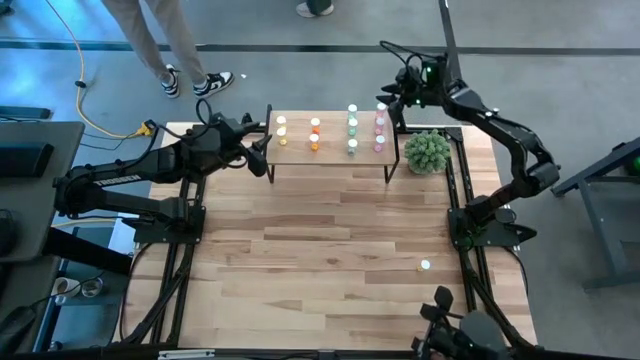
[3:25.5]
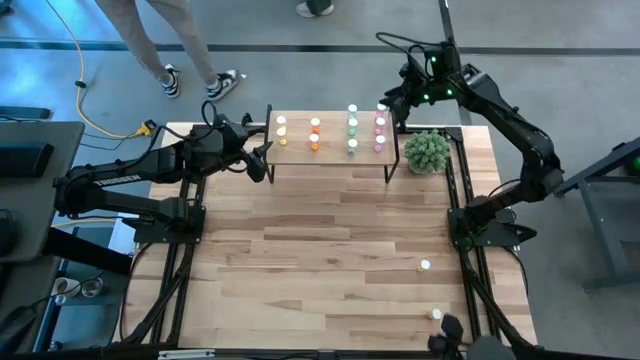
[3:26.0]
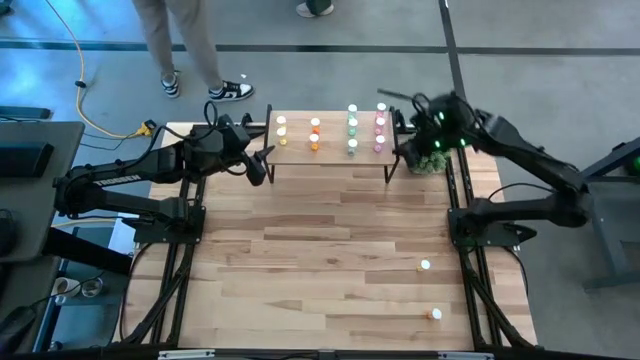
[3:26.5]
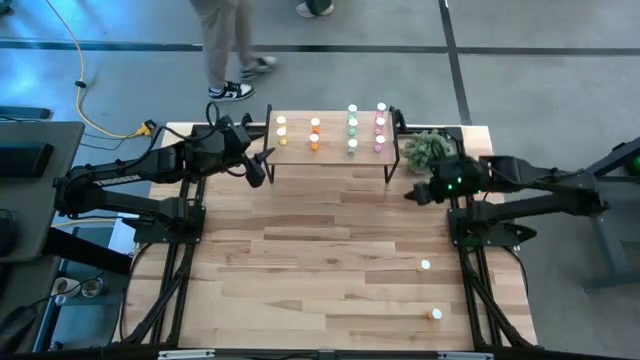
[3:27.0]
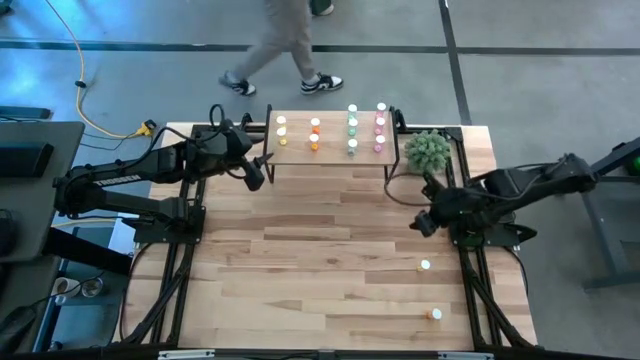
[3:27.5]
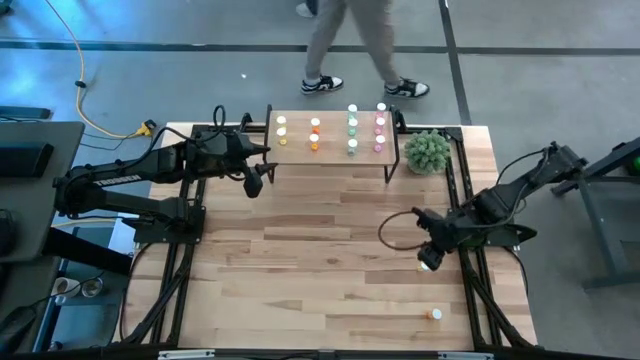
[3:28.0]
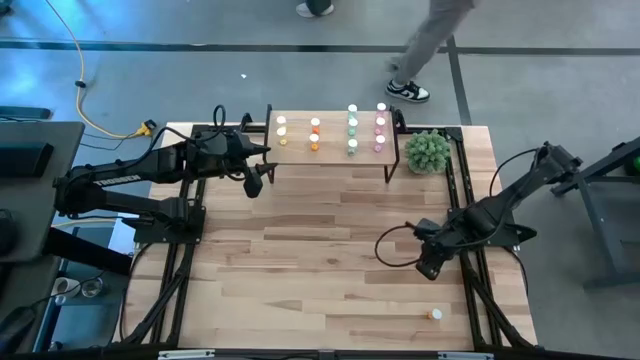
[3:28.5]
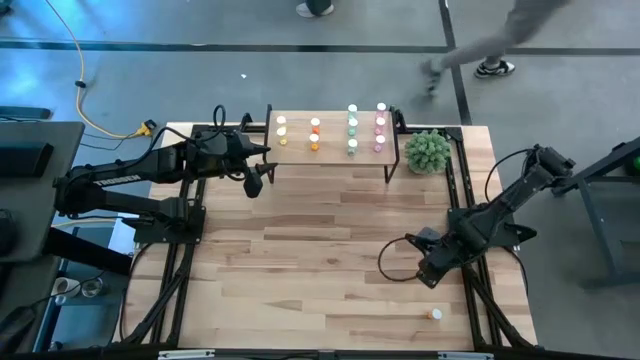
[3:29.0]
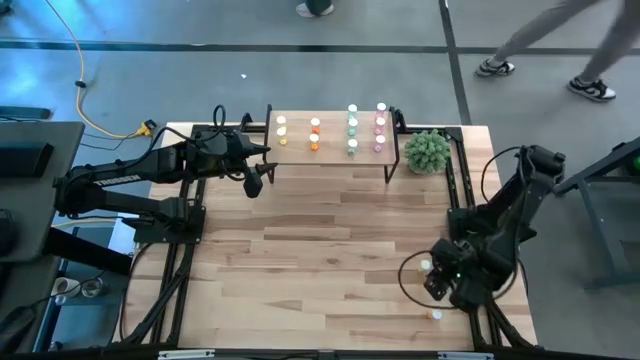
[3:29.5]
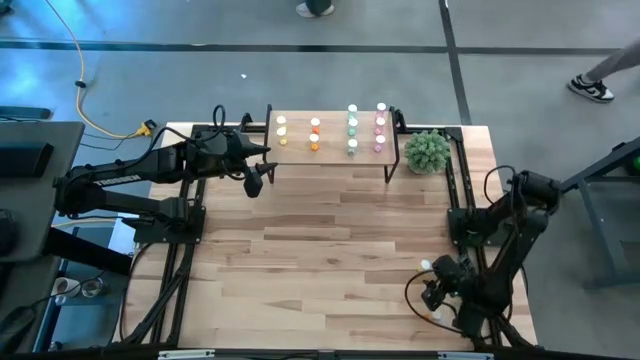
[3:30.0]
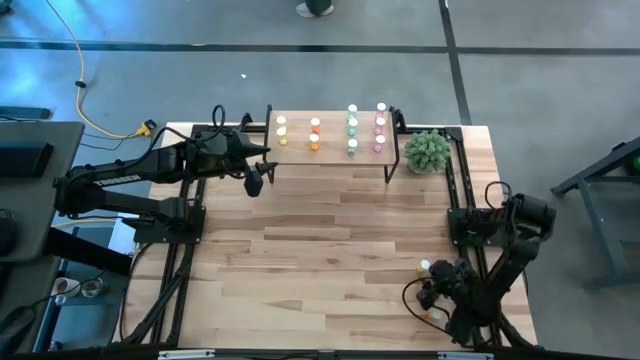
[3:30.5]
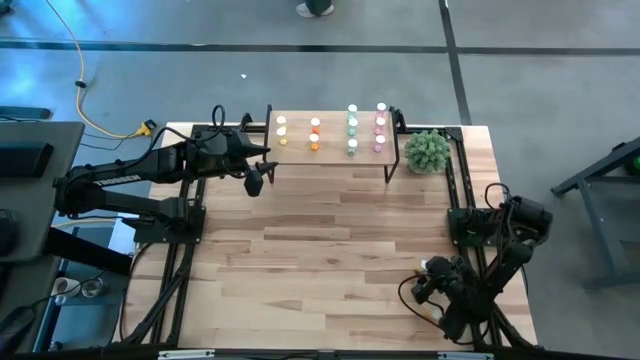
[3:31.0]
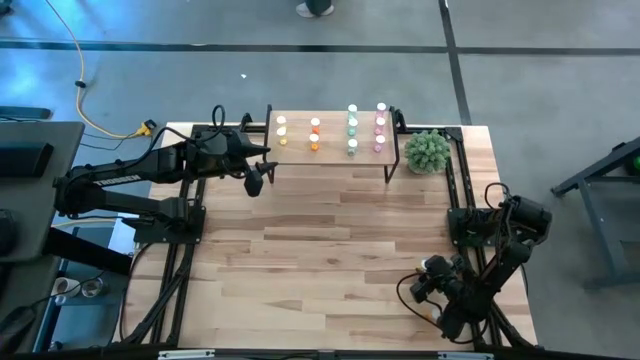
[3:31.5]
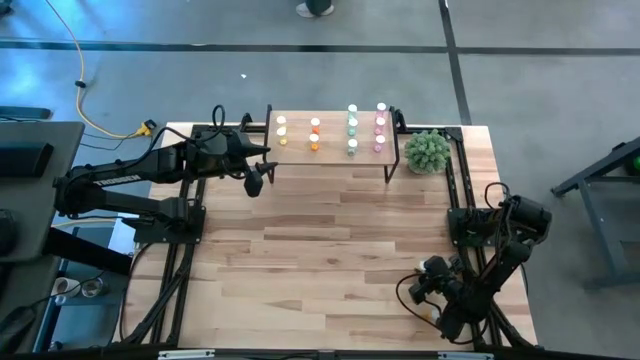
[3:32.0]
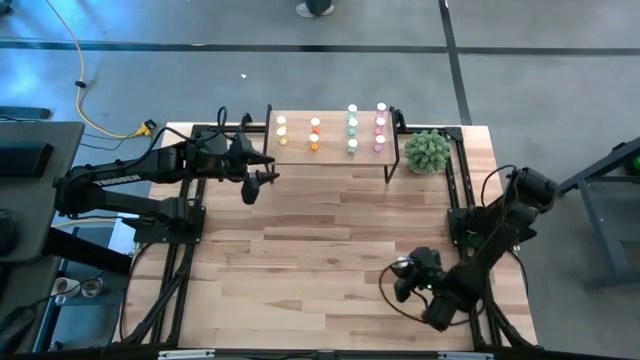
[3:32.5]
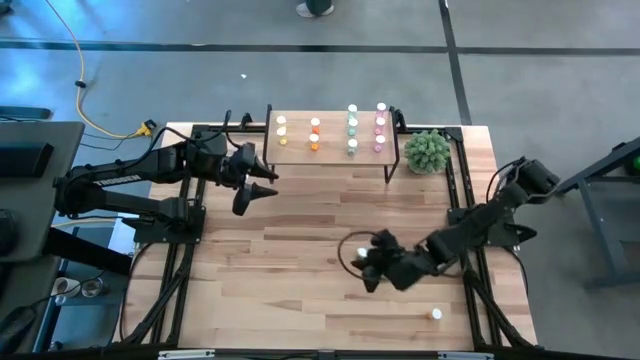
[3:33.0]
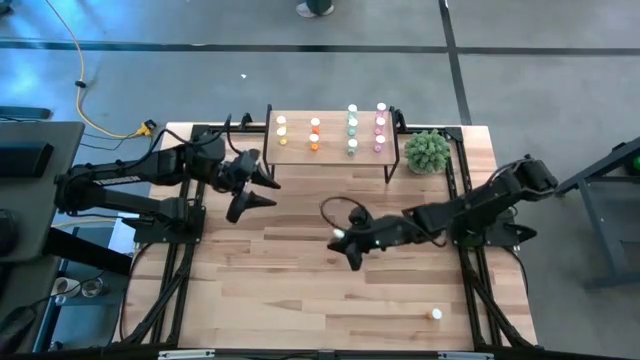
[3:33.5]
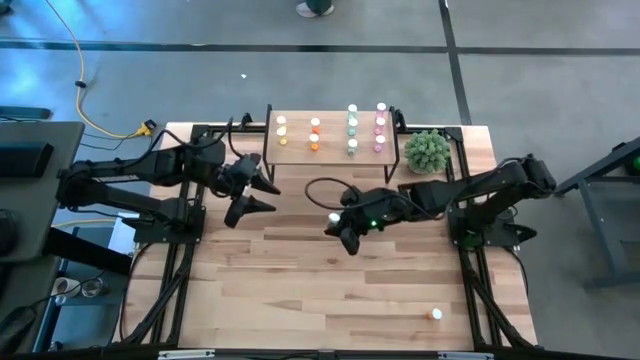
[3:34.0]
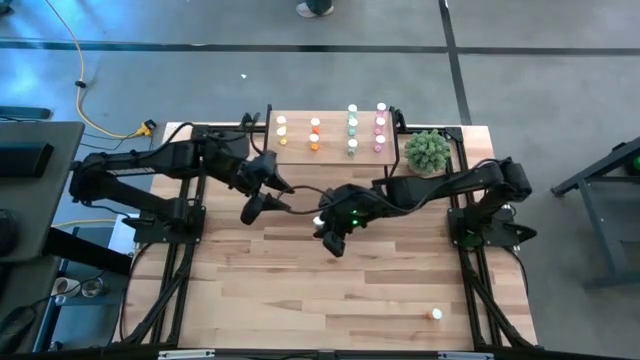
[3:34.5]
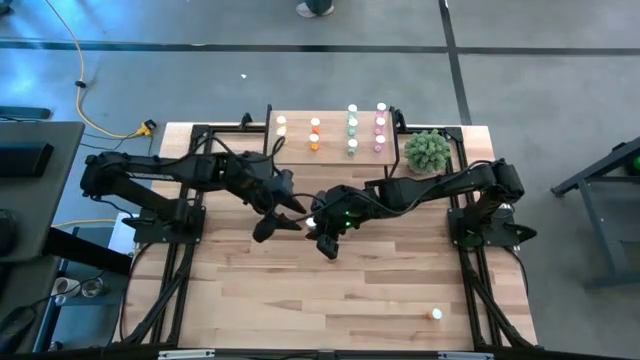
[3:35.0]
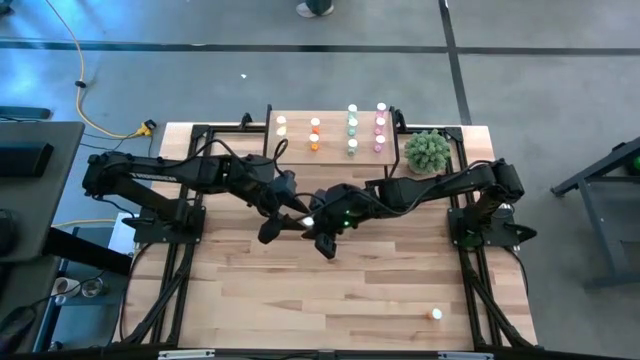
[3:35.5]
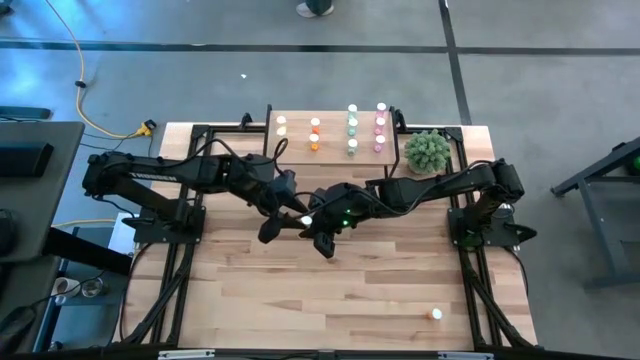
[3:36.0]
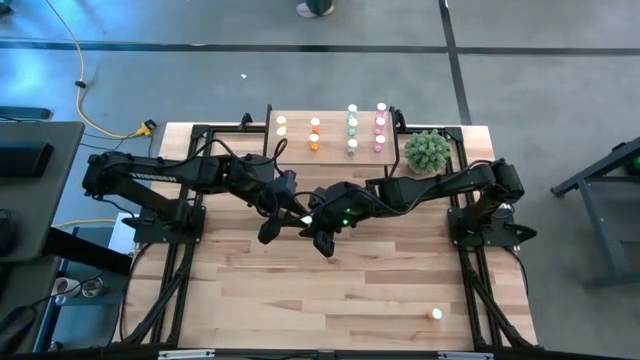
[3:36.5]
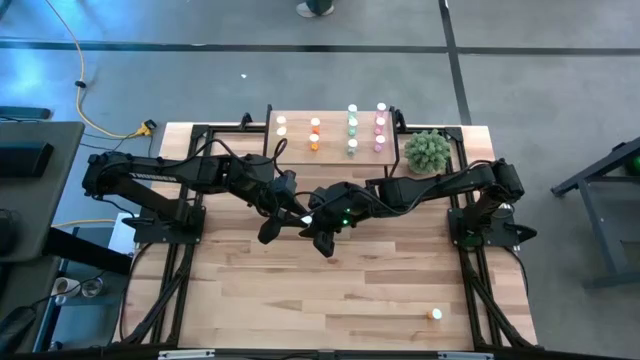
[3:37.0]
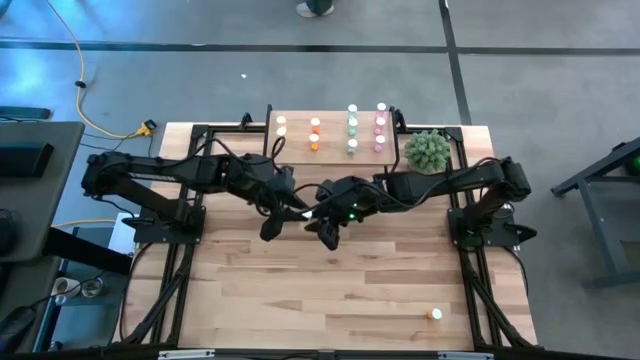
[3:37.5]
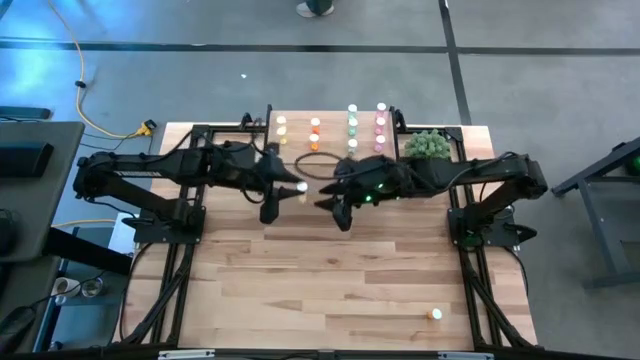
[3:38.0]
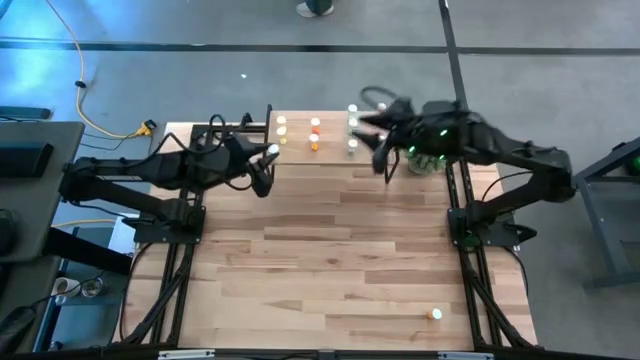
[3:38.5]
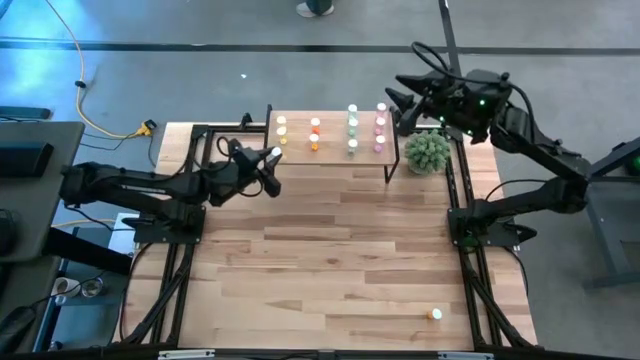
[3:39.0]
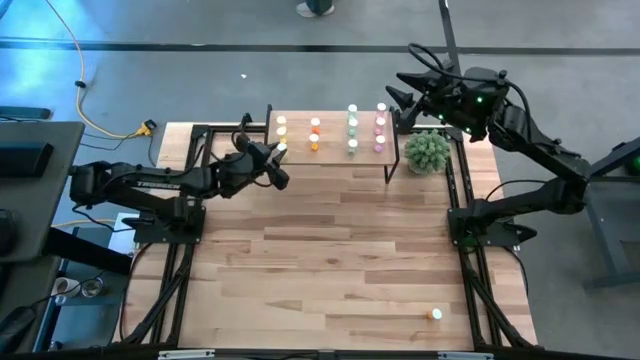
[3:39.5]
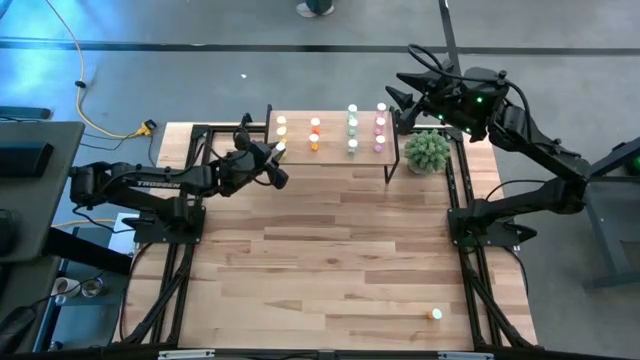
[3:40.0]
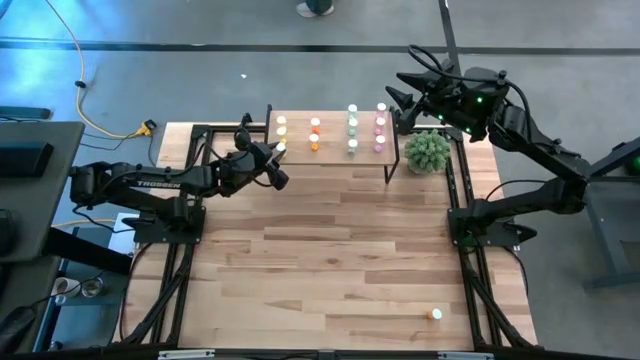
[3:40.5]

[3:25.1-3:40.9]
Task: Pick and place medicine bottles onto shelf by color
Put the yellow pill bottle on the shelf aligned with the other yellow pill bottles

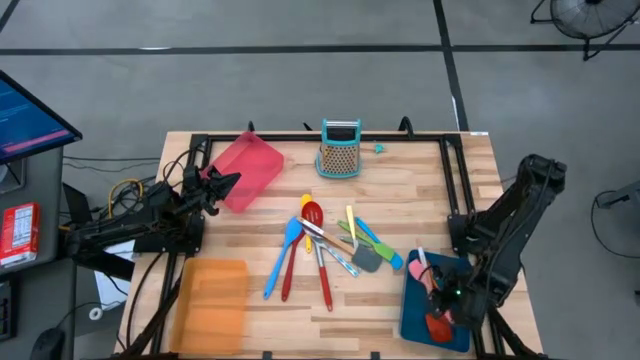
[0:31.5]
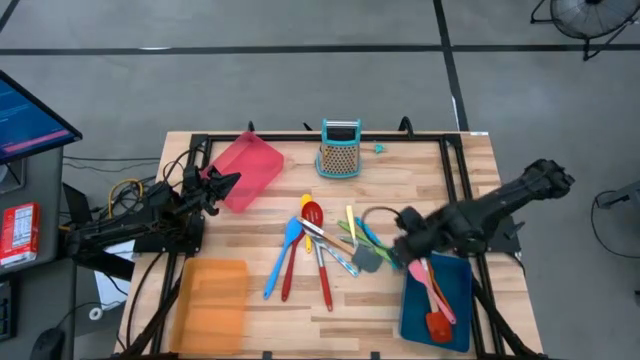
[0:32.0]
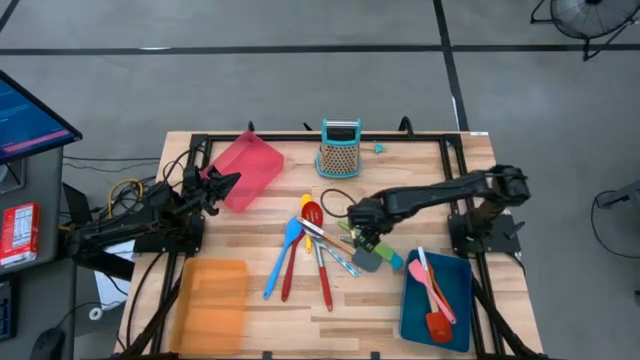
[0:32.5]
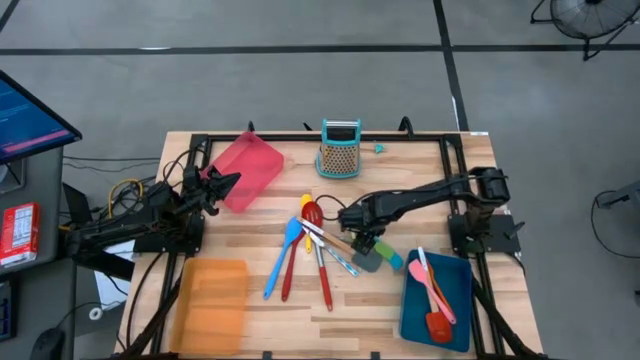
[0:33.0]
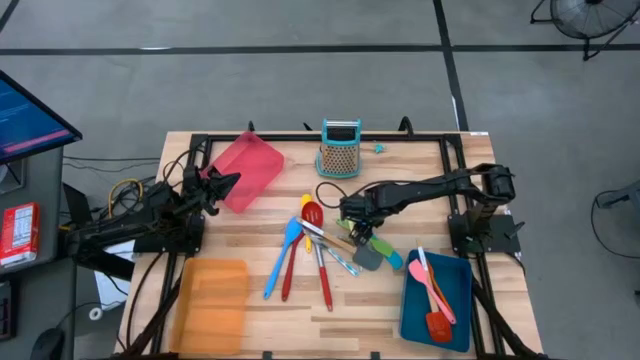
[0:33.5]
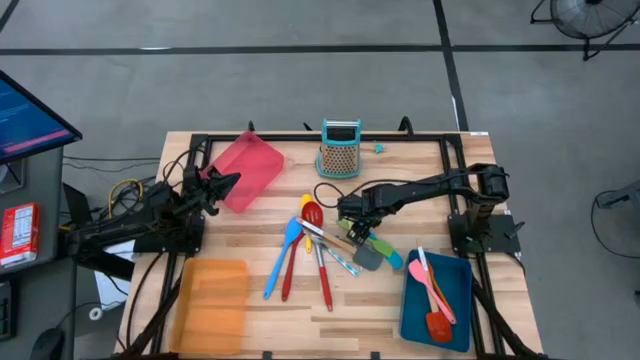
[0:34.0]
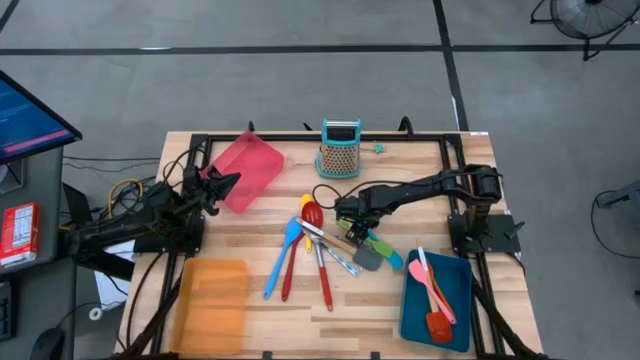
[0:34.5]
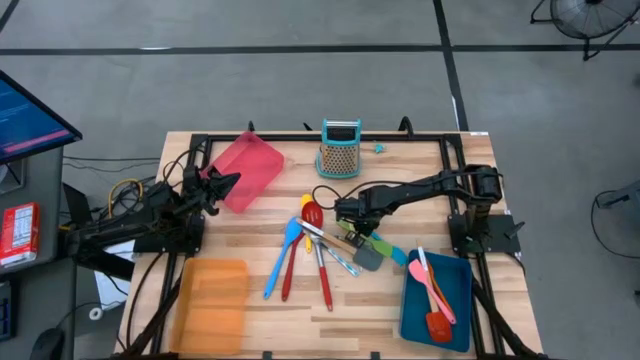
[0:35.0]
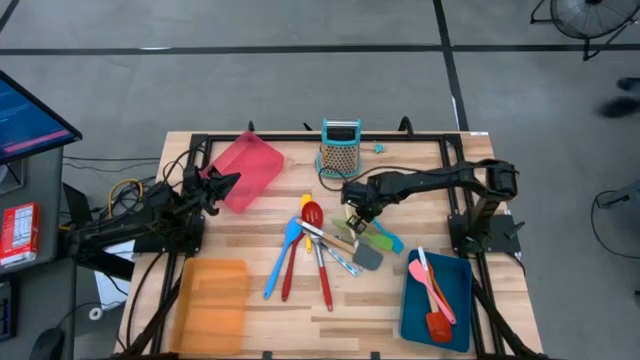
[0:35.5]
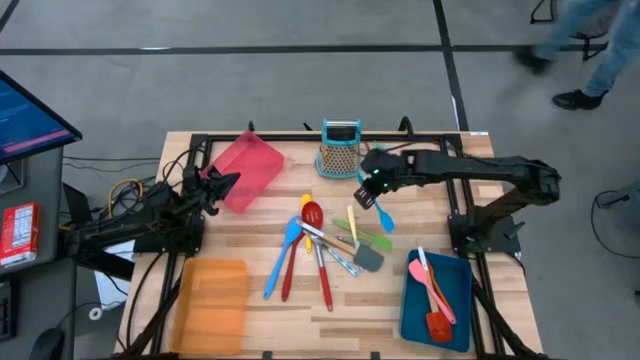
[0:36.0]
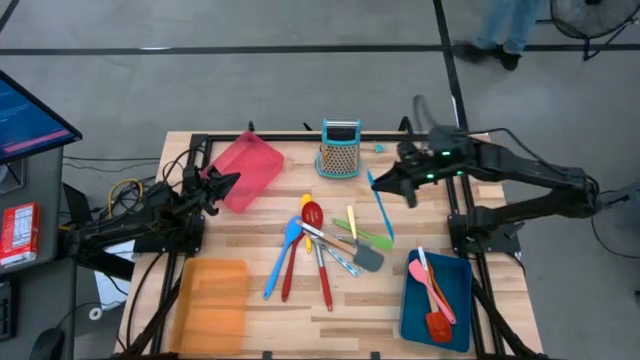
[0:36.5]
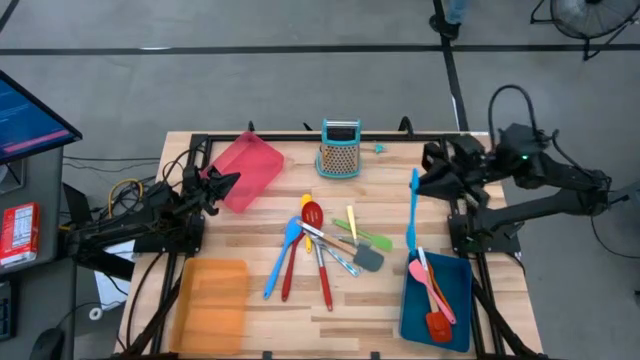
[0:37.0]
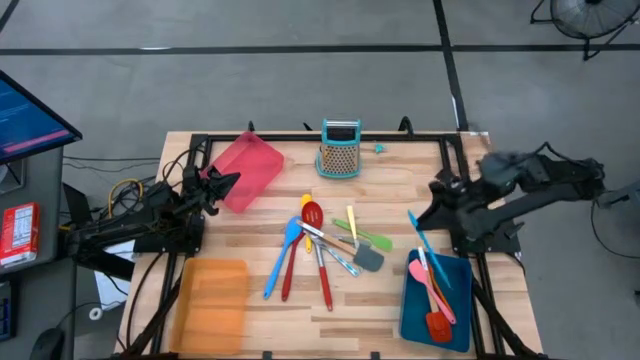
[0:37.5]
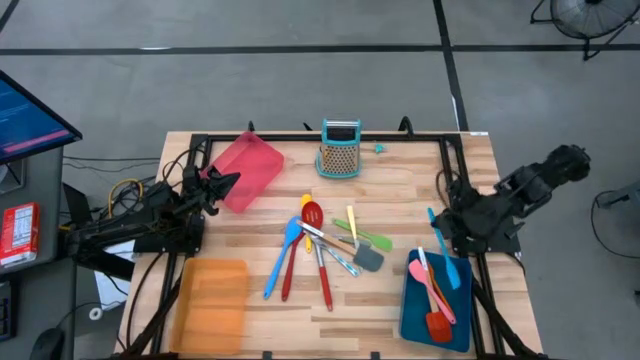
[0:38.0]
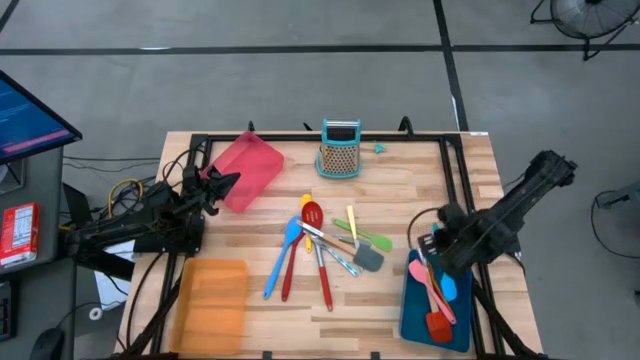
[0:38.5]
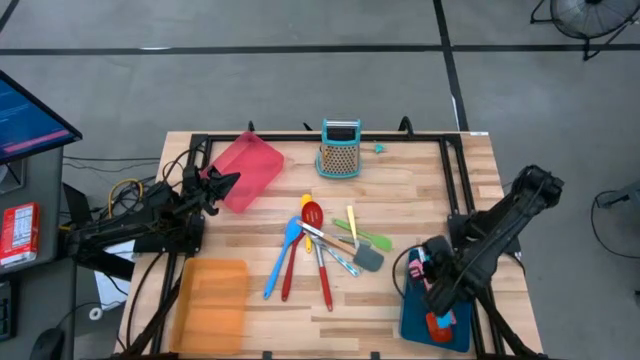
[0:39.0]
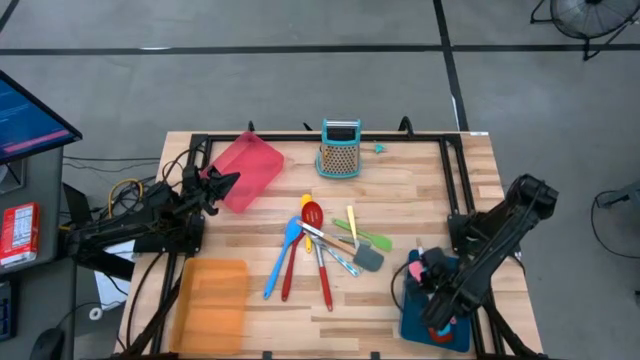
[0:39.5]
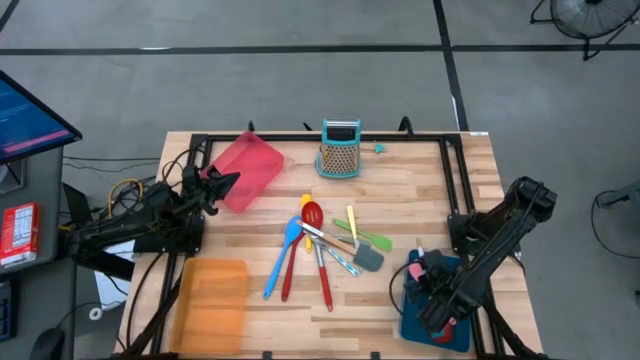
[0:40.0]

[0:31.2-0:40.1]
Task: Pick & Place Kitchen Items
Put the blue spatula into the blue bin
